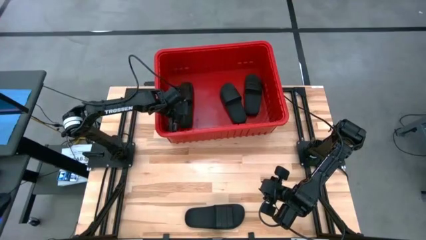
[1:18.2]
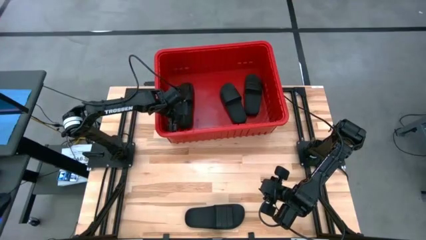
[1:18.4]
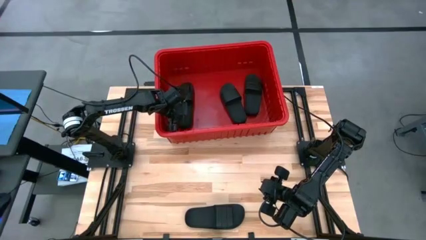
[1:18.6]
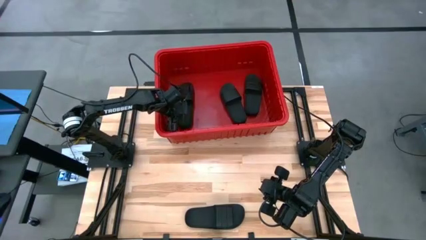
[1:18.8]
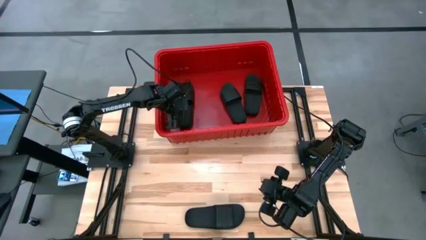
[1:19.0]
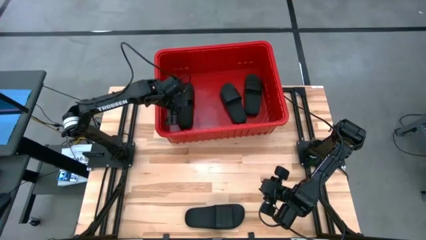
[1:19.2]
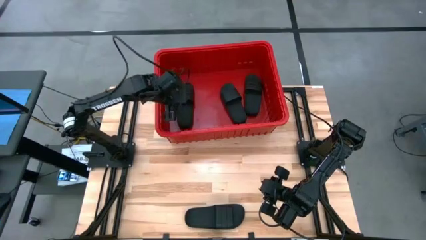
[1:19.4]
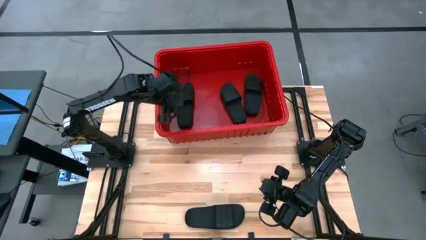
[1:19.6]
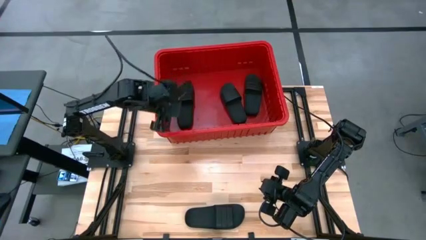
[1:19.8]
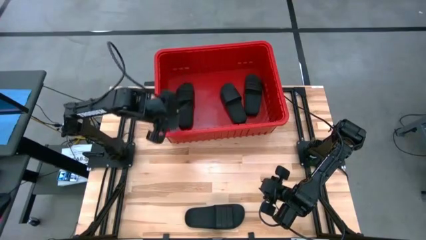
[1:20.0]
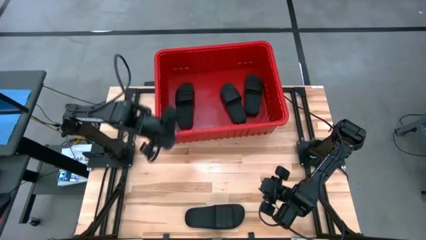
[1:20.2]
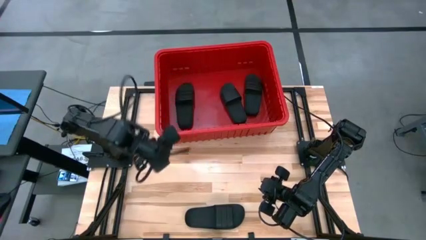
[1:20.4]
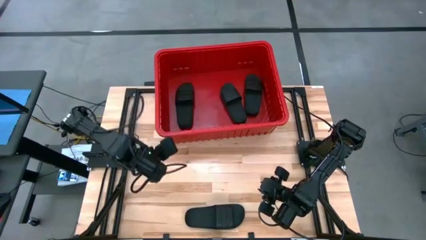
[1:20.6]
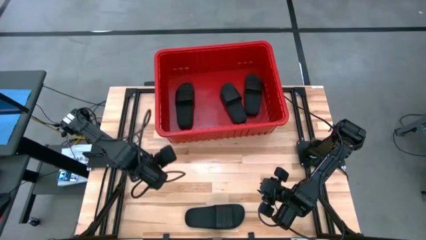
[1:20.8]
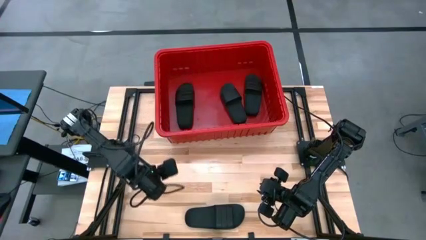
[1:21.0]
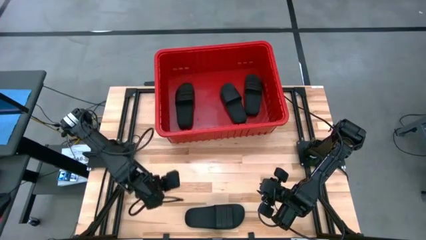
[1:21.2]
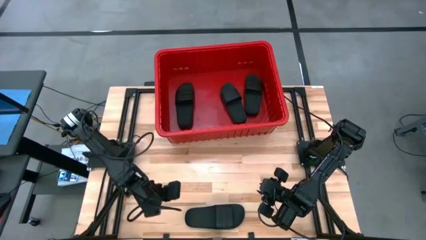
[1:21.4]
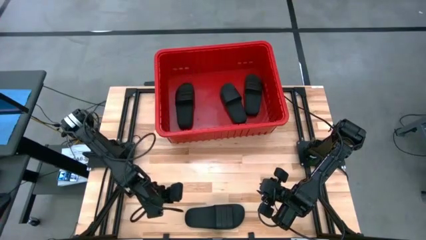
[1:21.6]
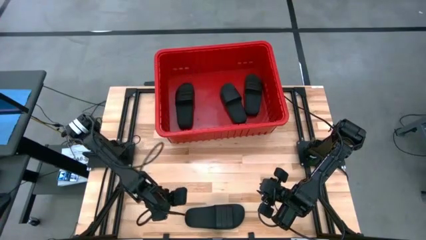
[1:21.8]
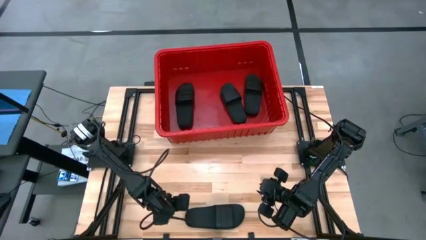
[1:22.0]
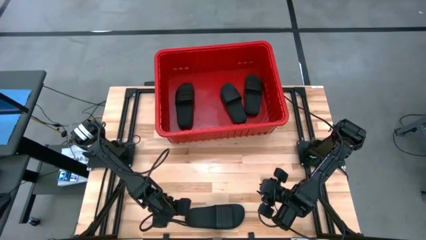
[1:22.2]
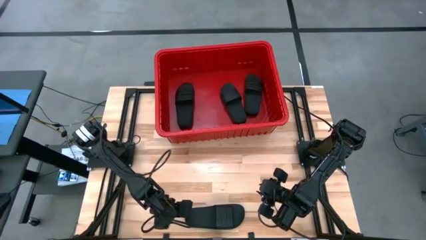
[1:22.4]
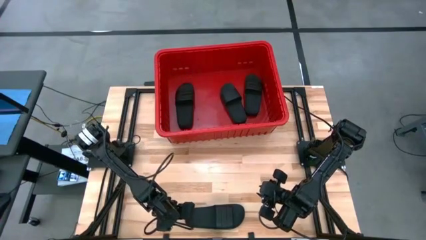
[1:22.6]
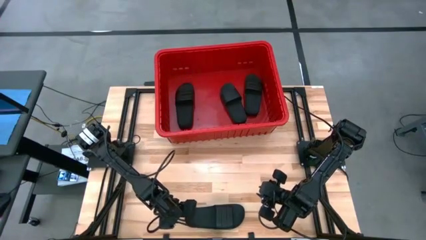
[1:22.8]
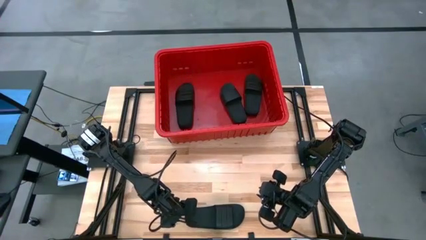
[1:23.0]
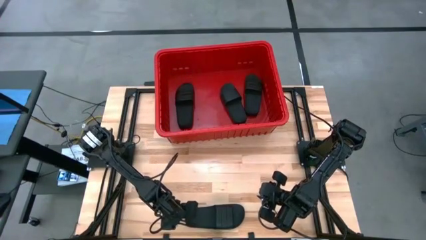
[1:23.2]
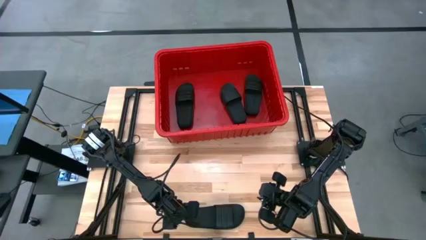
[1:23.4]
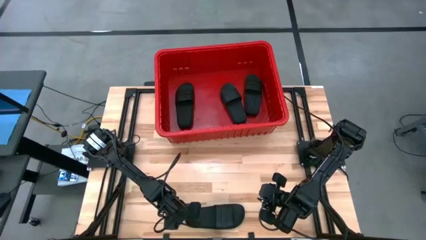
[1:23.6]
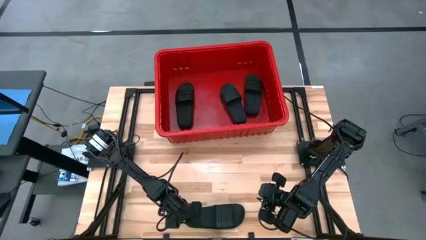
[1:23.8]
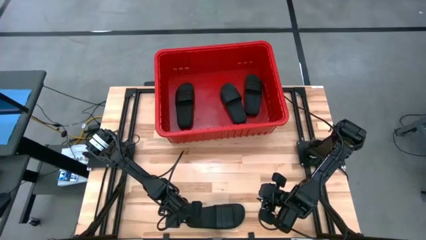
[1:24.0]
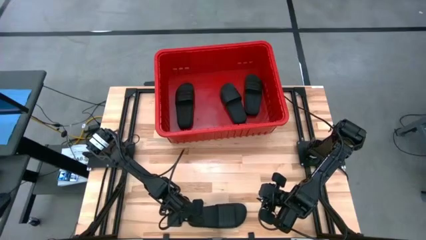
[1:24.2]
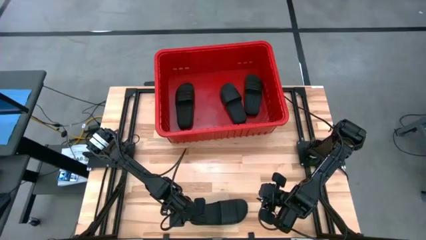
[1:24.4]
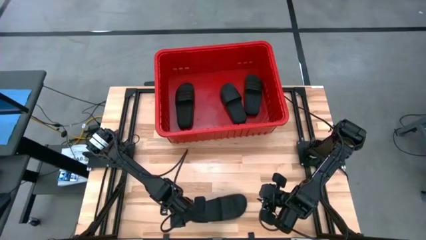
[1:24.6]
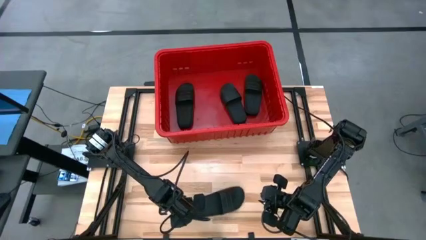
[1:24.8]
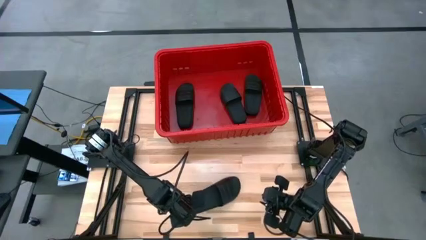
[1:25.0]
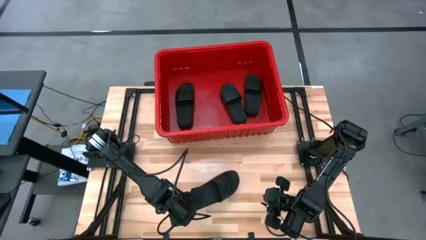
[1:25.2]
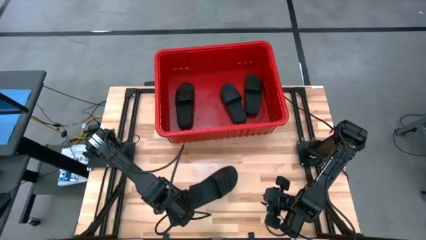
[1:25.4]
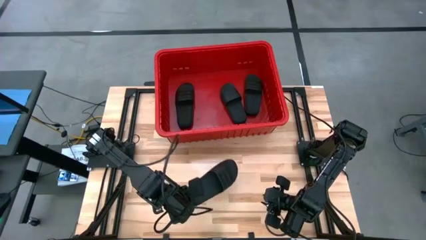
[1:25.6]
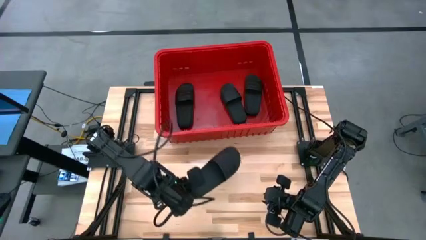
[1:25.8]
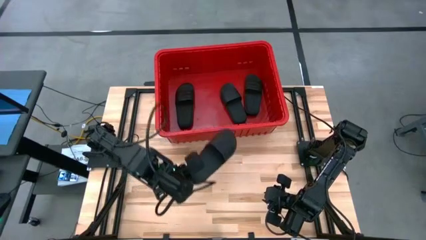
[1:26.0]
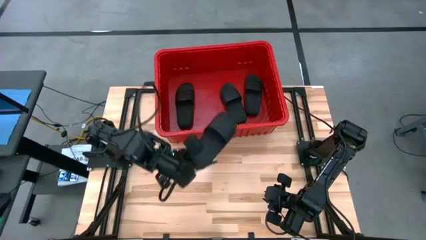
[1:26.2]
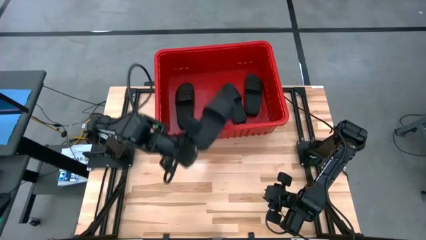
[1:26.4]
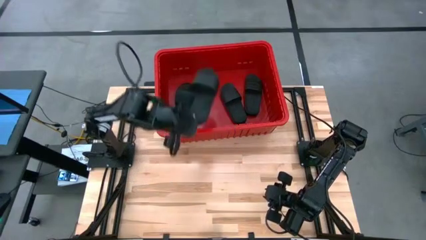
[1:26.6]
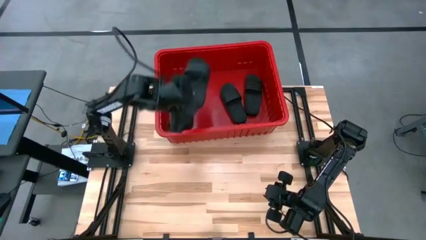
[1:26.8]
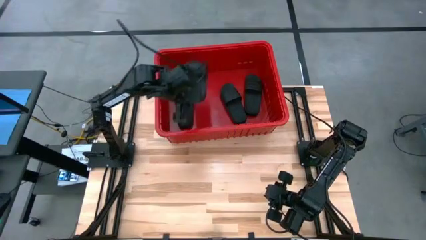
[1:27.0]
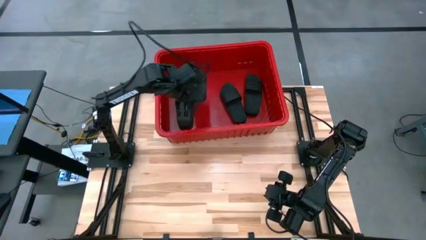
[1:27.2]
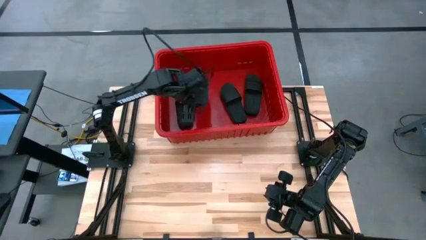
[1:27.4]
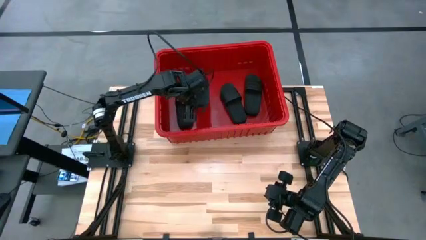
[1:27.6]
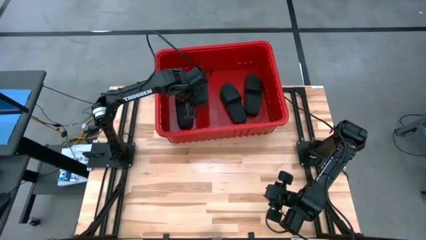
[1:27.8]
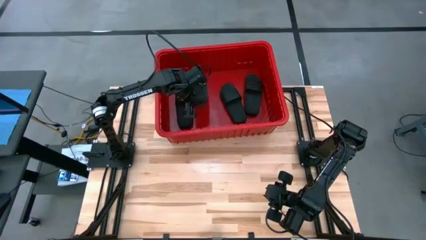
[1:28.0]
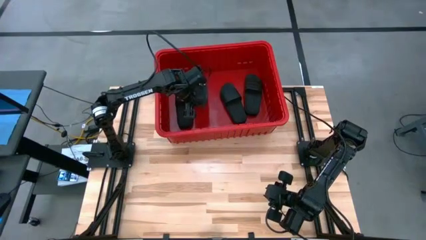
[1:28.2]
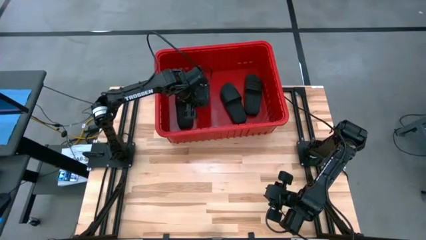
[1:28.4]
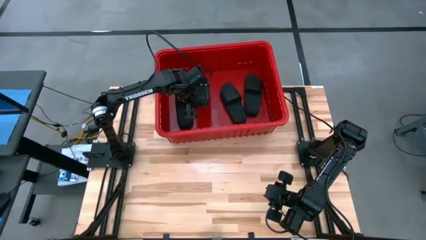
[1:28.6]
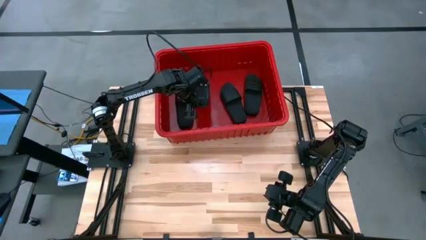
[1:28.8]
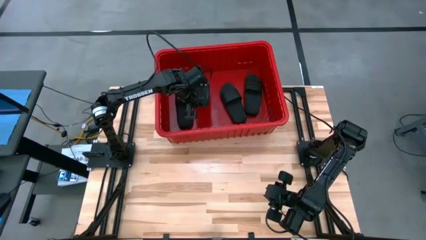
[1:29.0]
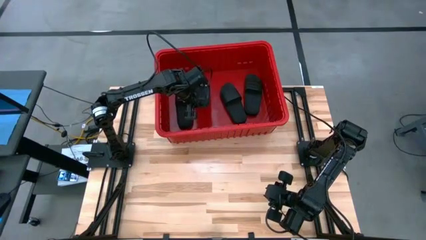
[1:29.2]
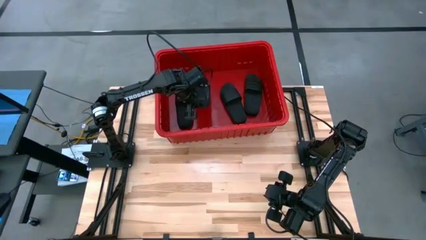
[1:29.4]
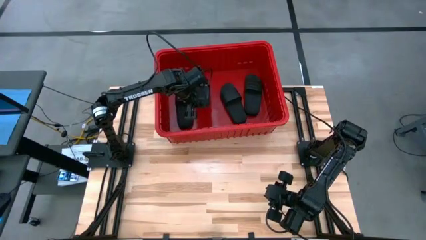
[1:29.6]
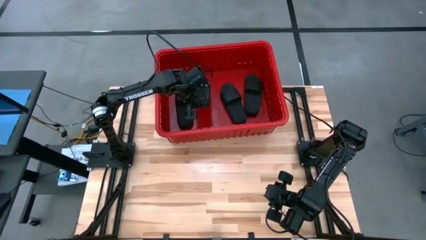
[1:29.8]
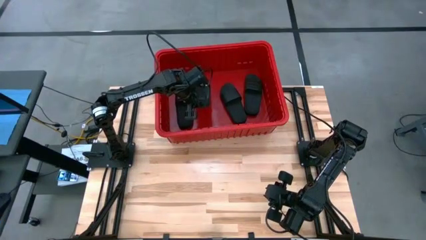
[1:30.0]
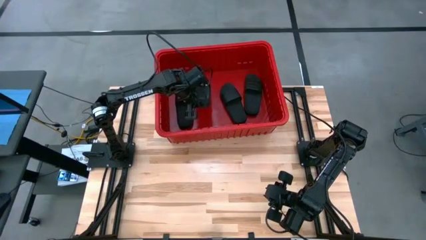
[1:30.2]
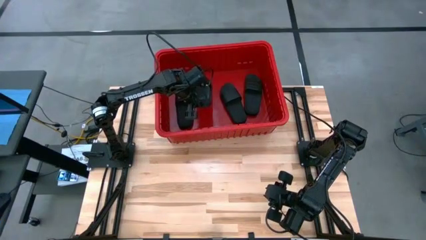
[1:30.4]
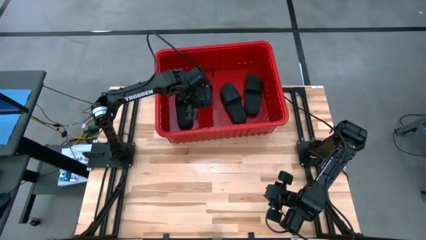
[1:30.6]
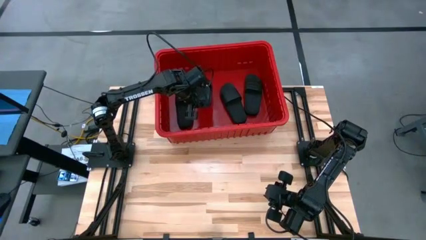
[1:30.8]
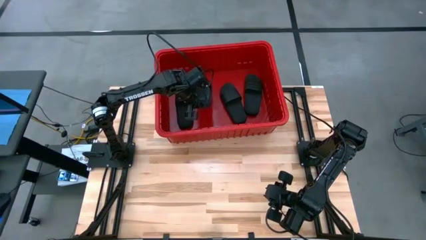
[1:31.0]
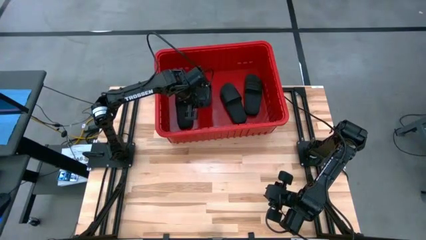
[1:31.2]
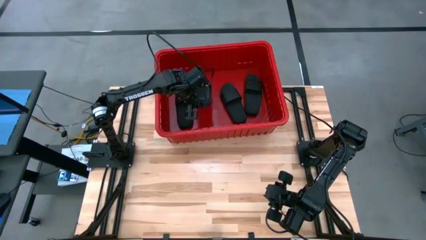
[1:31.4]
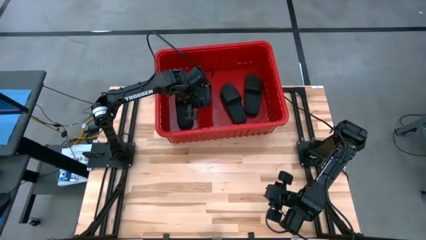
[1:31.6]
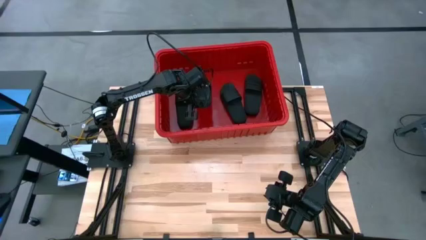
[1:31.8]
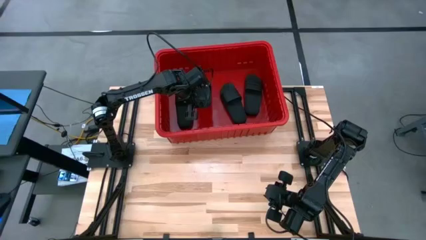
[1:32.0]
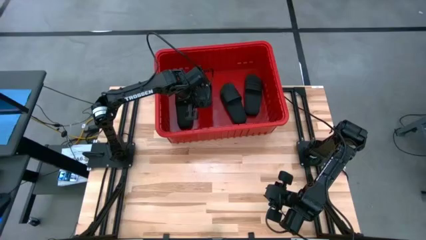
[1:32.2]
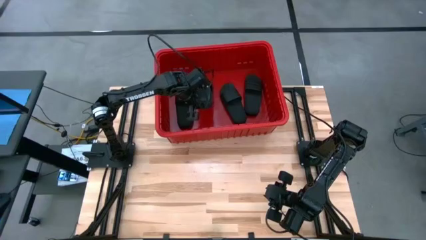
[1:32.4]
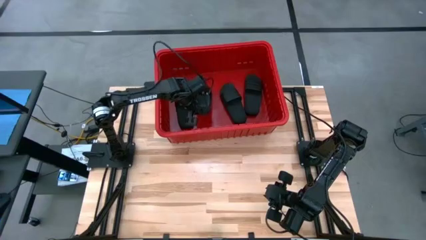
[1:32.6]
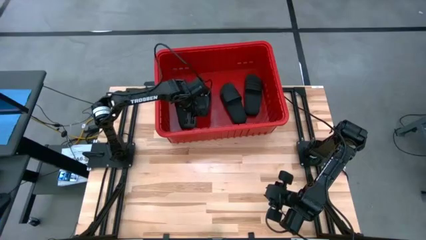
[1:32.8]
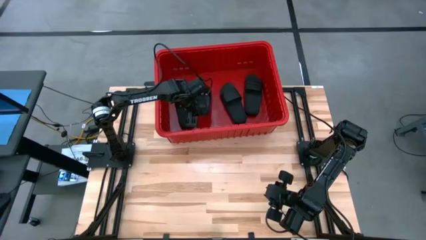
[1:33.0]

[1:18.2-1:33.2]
Task: Pick and place slides into bin
Put the black slide into the container
